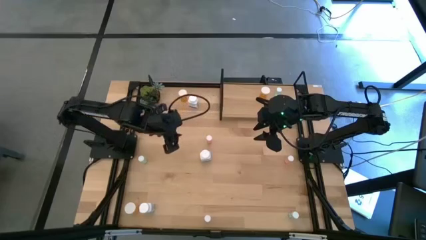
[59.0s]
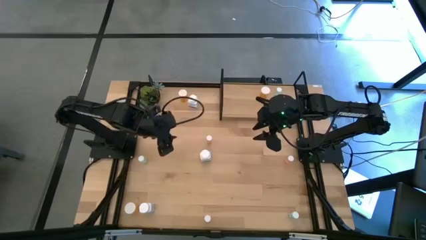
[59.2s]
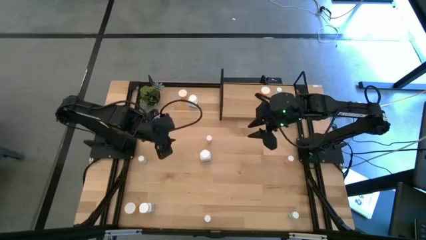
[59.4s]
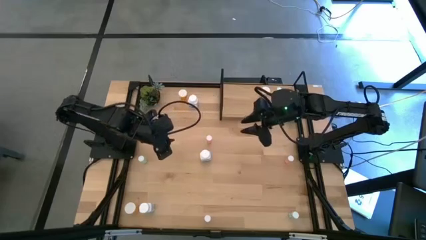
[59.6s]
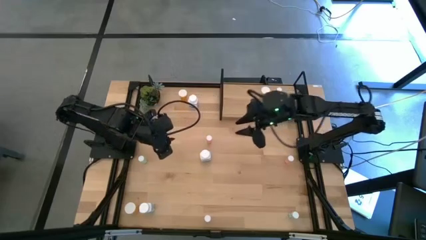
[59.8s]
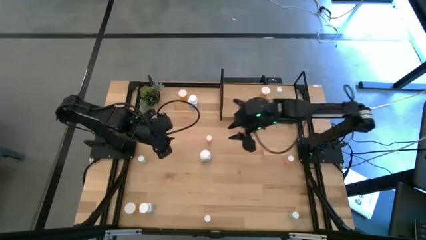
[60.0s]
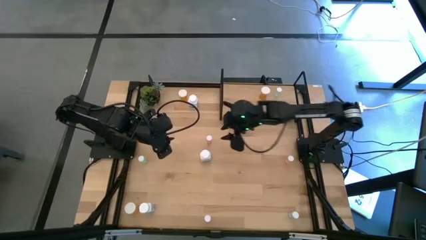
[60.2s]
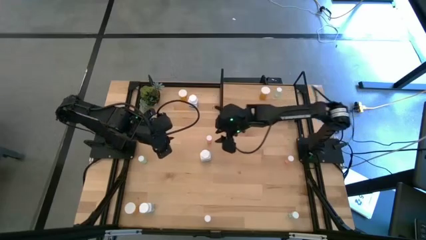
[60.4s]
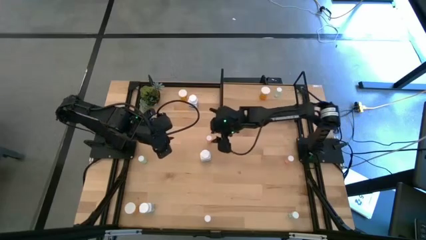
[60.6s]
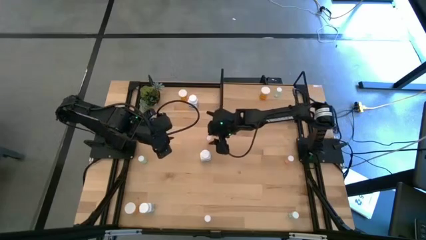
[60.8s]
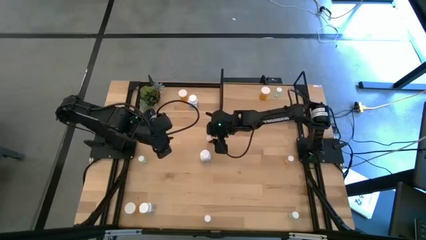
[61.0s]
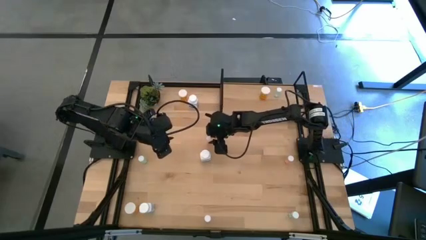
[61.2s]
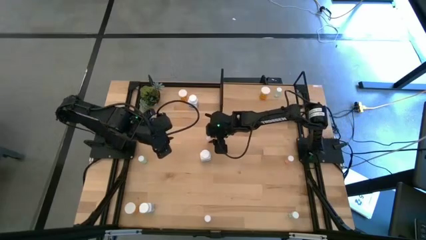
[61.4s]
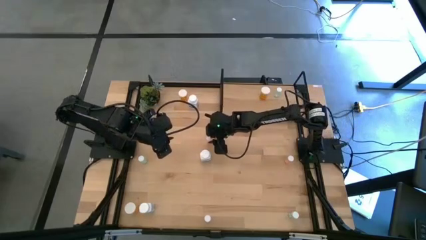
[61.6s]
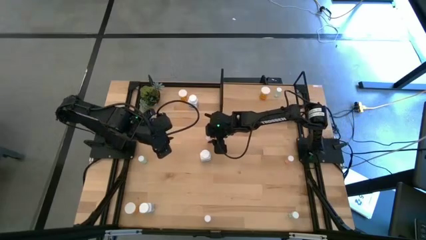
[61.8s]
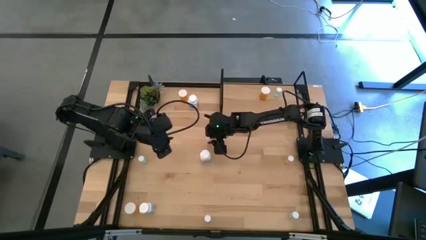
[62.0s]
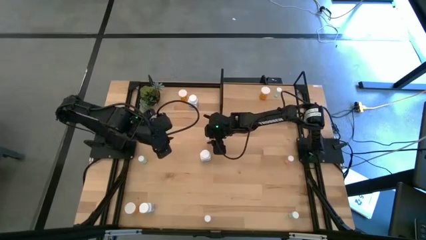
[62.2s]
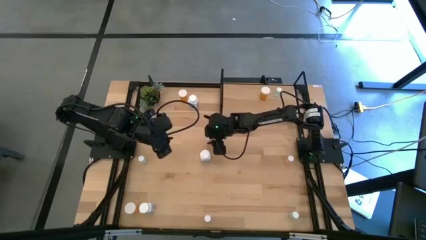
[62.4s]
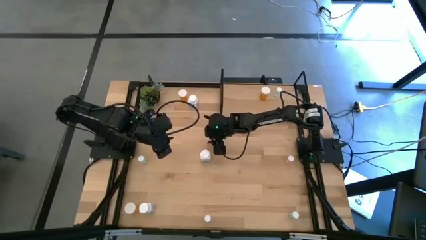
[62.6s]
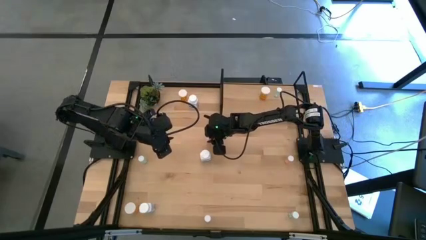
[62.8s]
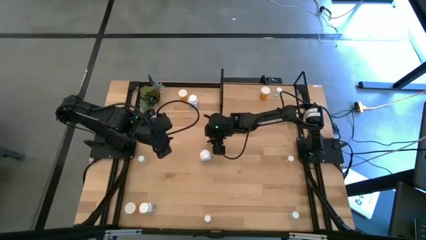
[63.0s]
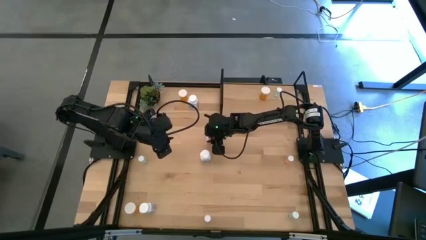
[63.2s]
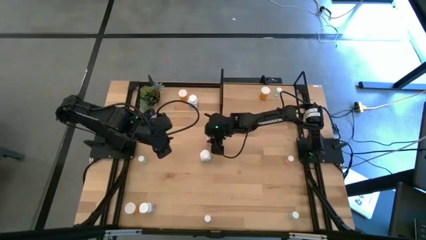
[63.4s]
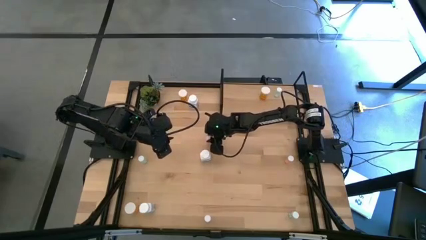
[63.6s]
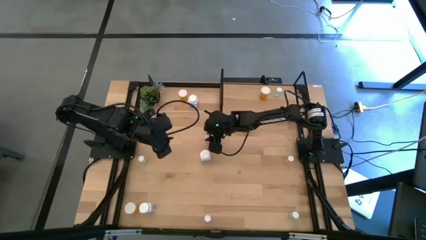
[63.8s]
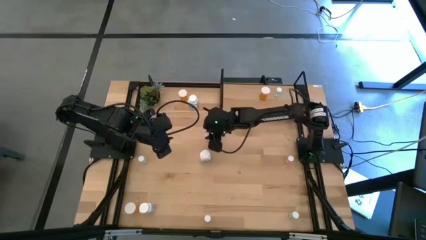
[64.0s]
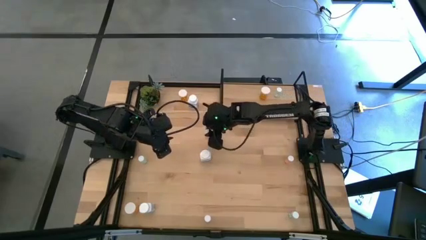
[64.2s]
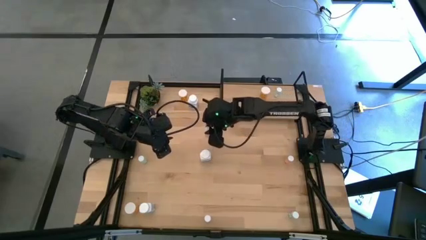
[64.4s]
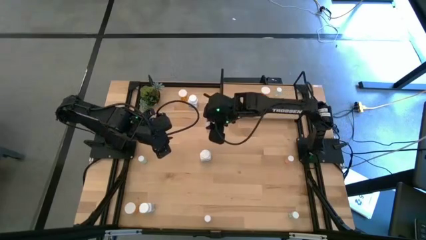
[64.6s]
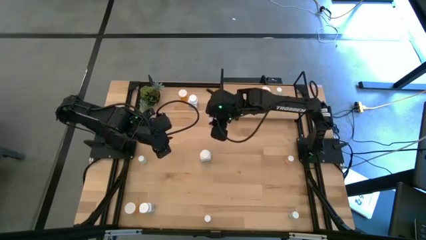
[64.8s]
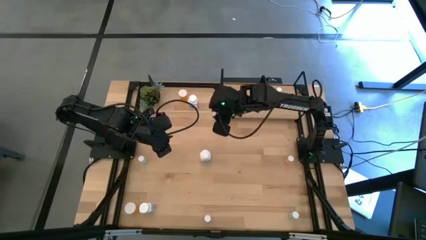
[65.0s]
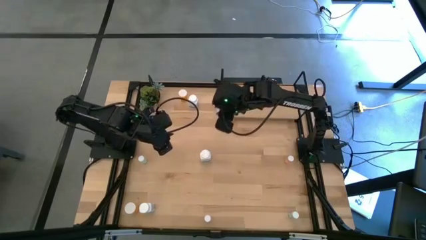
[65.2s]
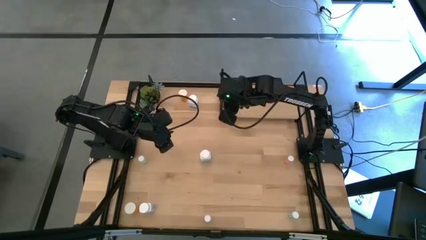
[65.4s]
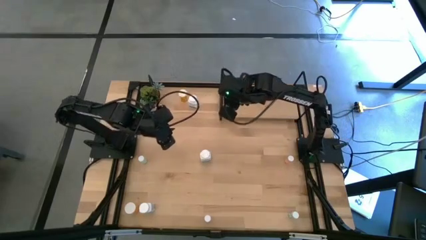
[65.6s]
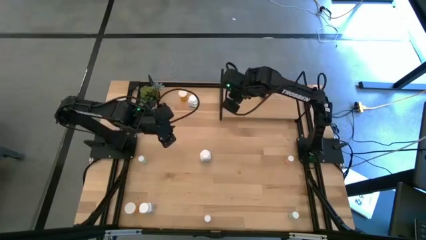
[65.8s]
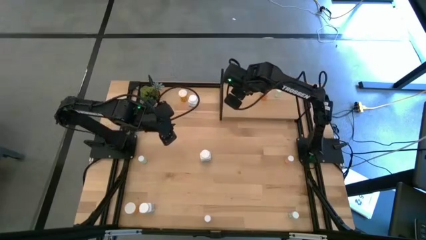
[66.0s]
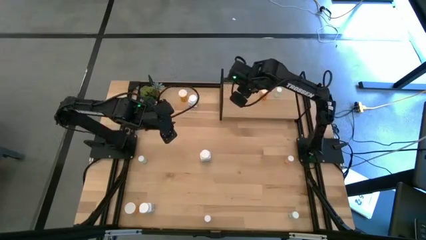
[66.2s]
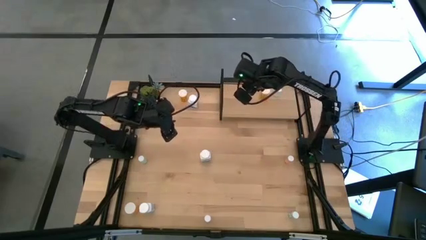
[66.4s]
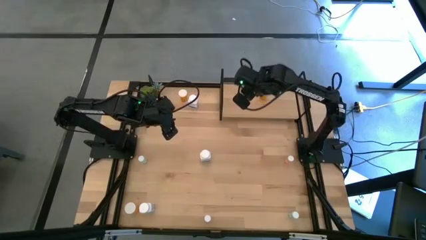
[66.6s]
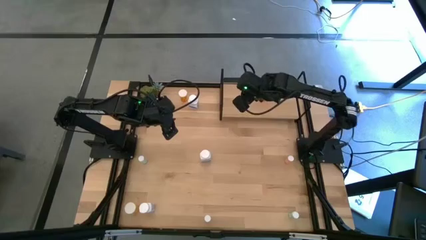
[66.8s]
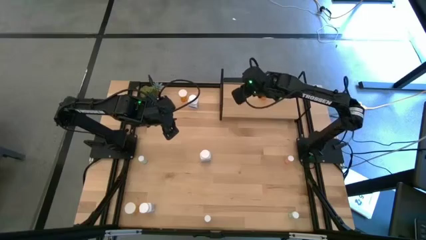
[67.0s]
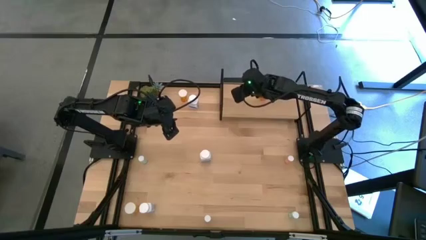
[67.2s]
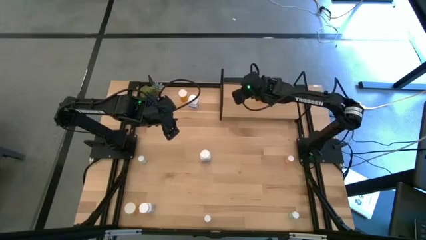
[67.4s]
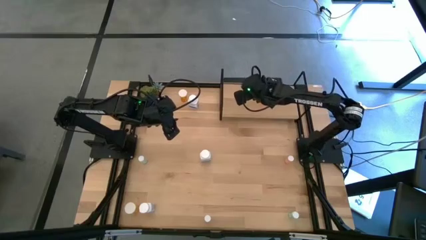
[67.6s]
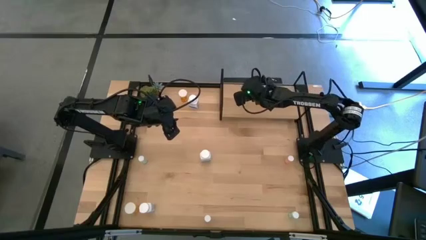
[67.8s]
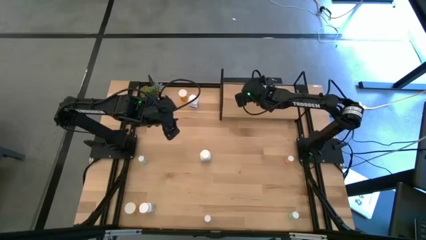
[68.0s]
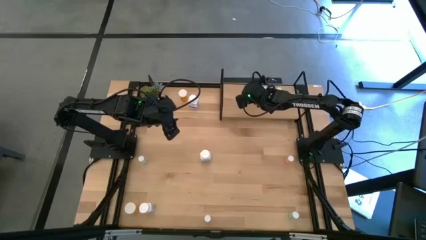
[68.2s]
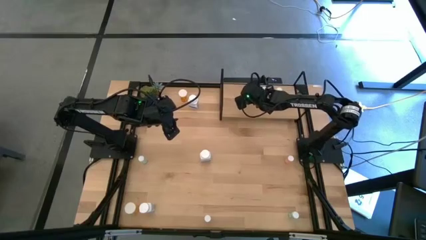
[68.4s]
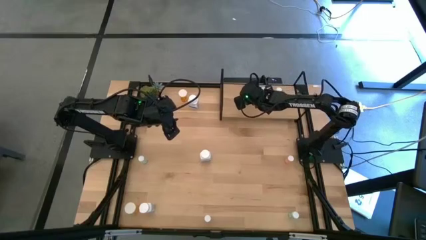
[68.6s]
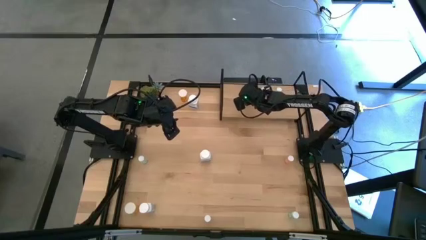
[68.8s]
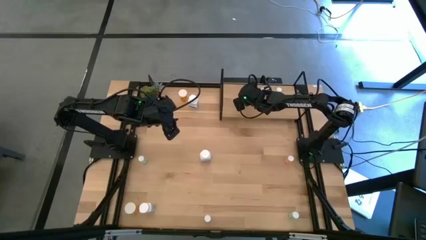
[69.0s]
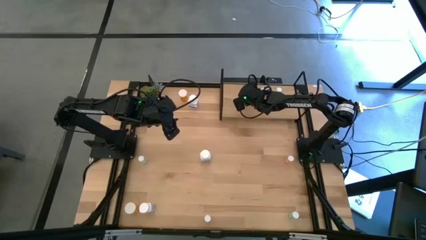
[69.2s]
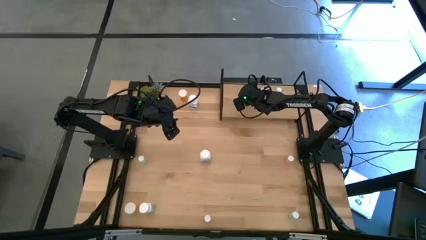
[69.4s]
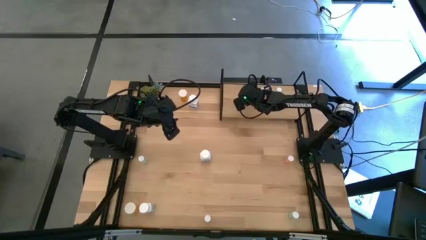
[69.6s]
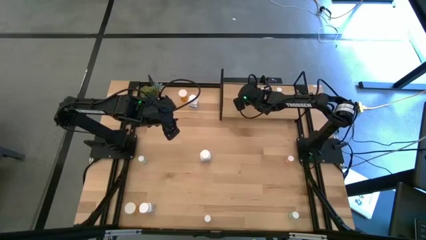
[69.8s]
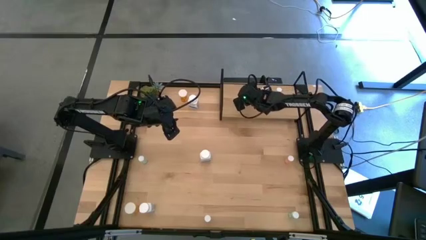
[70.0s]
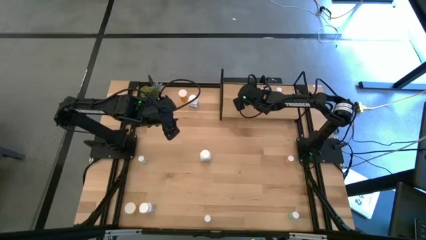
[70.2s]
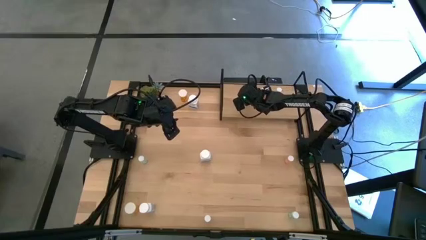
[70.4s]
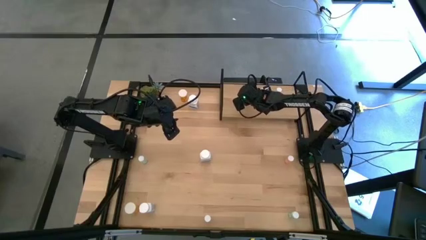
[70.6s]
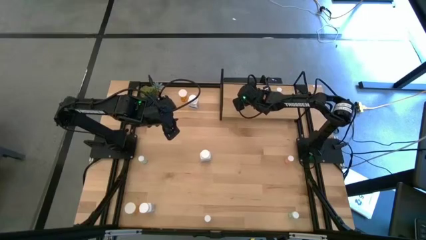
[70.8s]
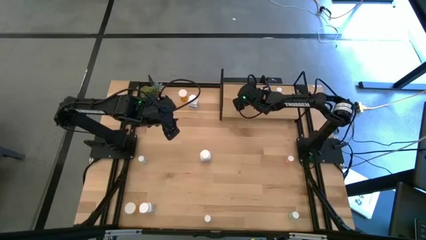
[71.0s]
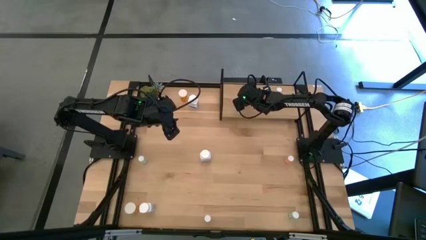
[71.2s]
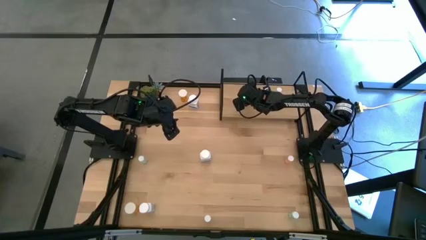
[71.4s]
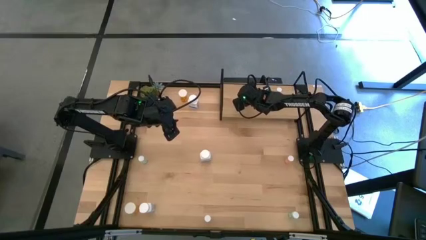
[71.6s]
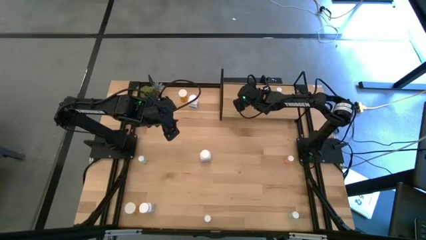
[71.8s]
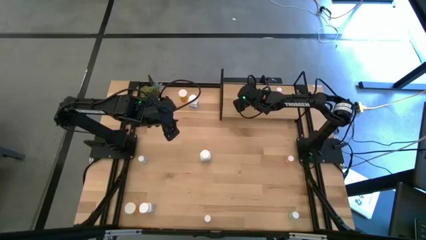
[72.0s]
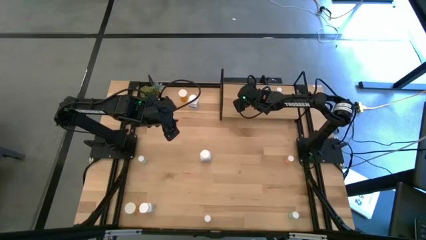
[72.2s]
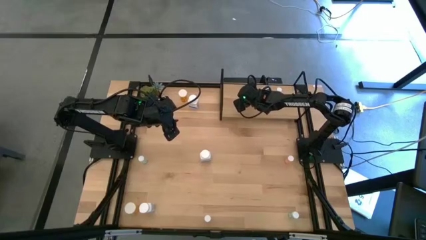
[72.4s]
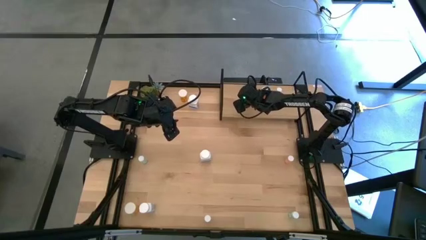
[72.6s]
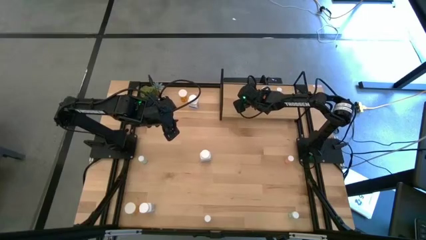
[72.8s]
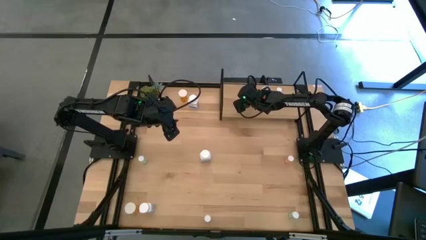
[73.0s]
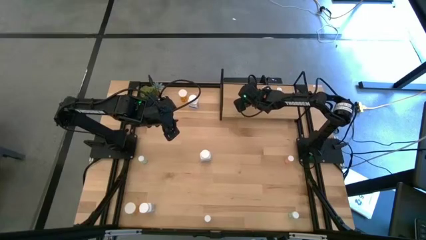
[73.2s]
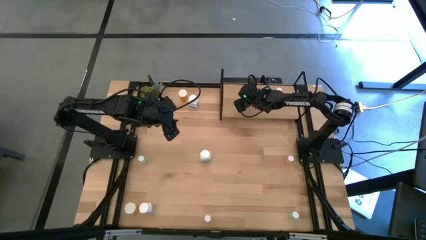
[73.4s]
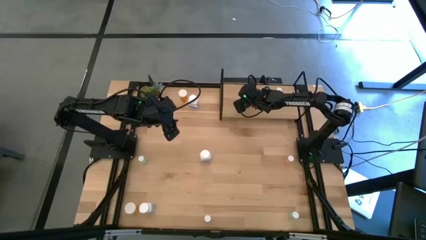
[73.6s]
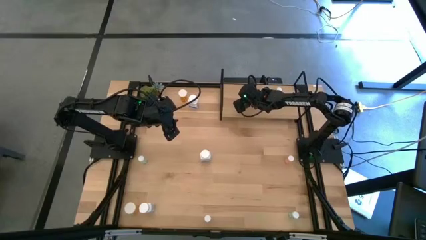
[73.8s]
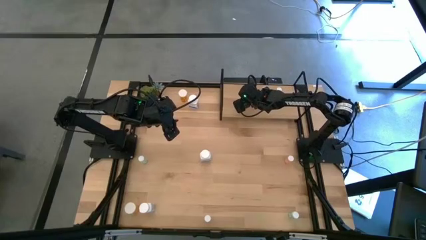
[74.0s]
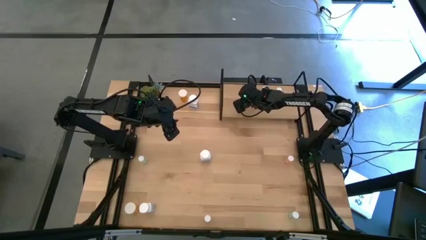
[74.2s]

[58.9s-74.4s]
Task: Pick and place medicine bottles onto shelf by color
Put the top left pink pill bottle on the shelf
